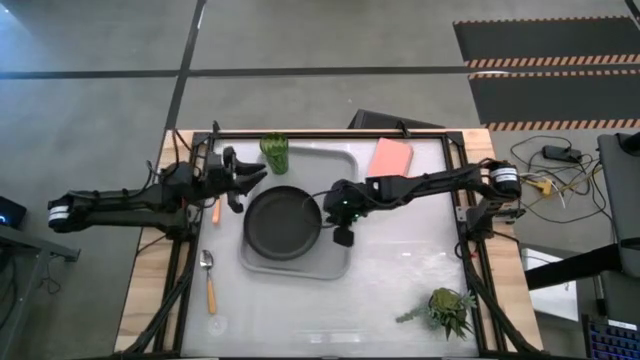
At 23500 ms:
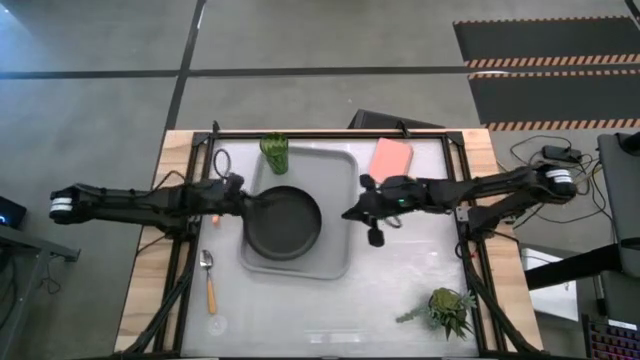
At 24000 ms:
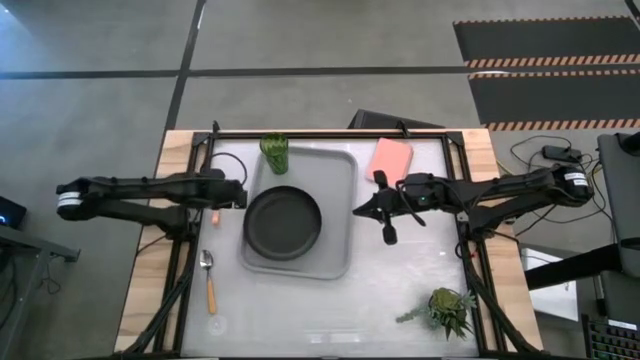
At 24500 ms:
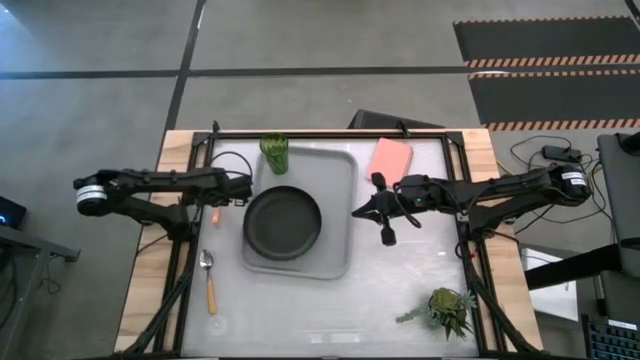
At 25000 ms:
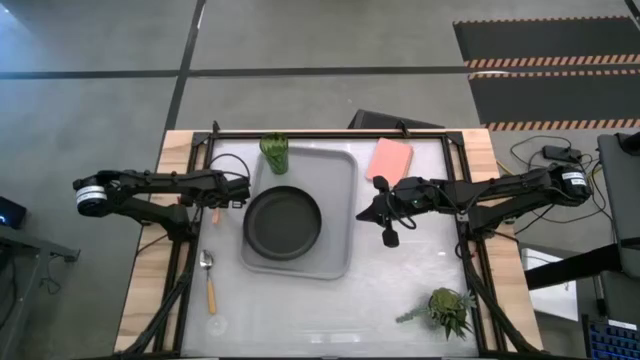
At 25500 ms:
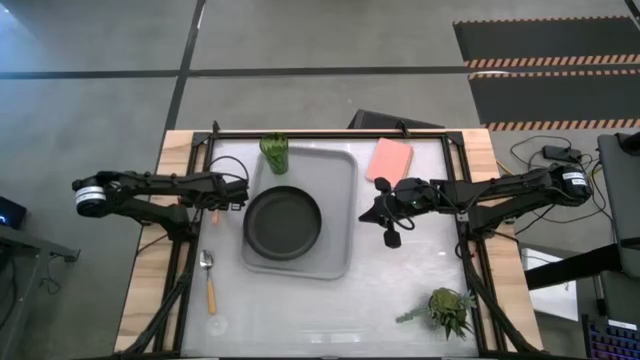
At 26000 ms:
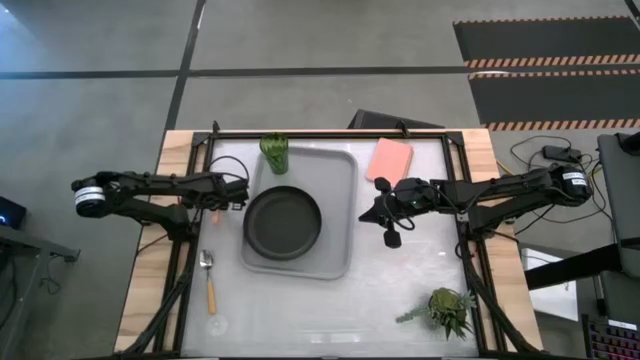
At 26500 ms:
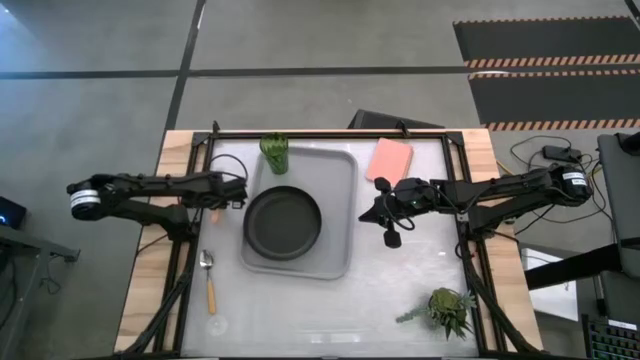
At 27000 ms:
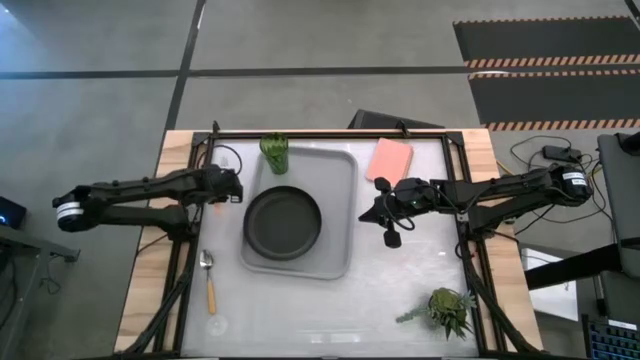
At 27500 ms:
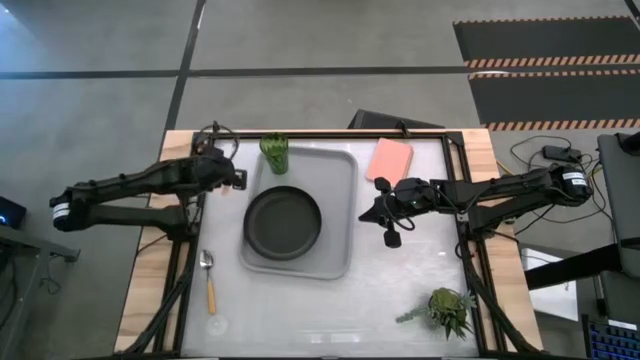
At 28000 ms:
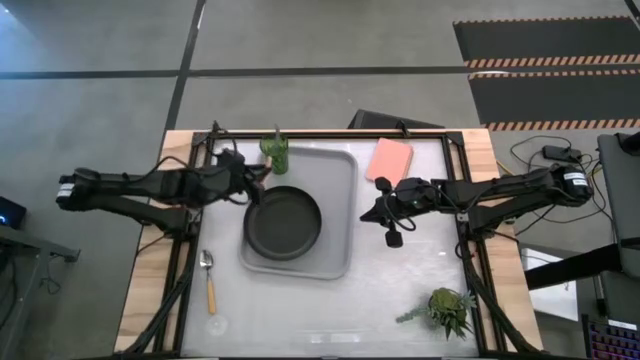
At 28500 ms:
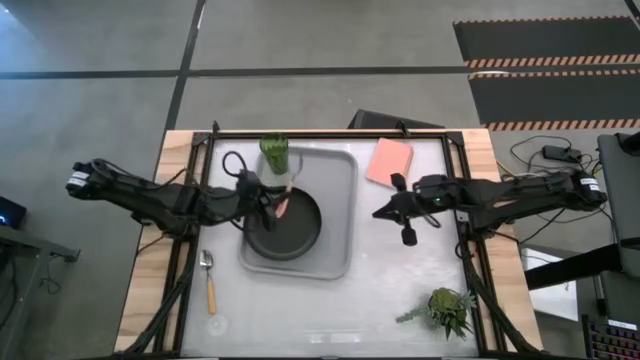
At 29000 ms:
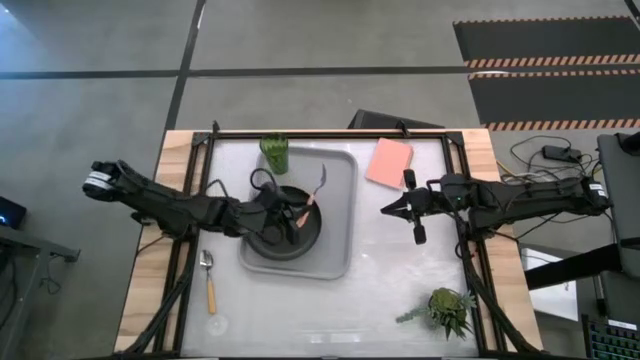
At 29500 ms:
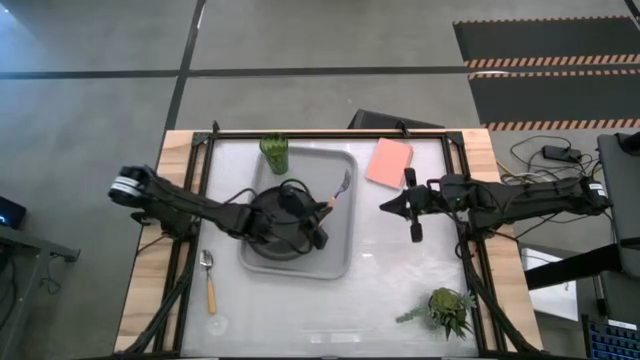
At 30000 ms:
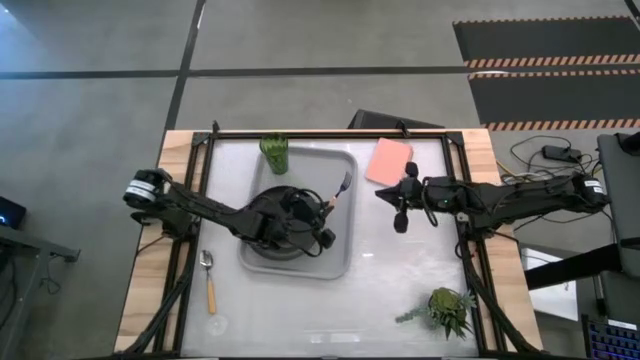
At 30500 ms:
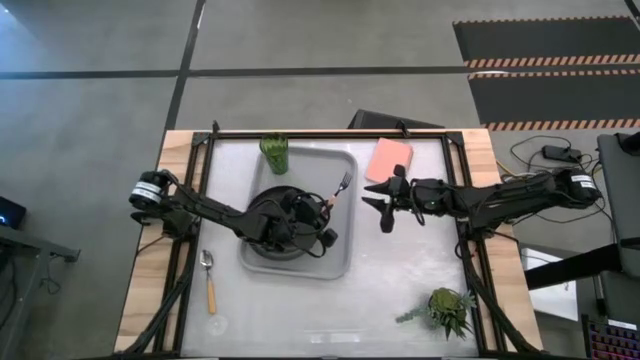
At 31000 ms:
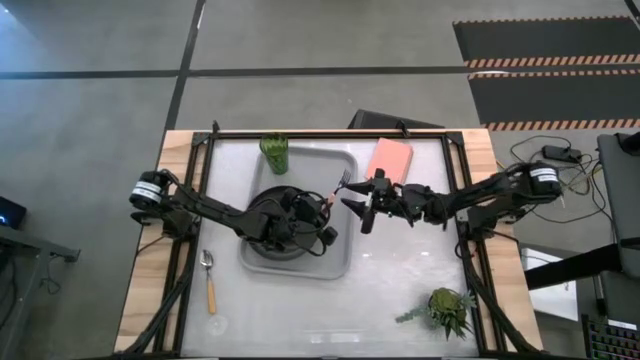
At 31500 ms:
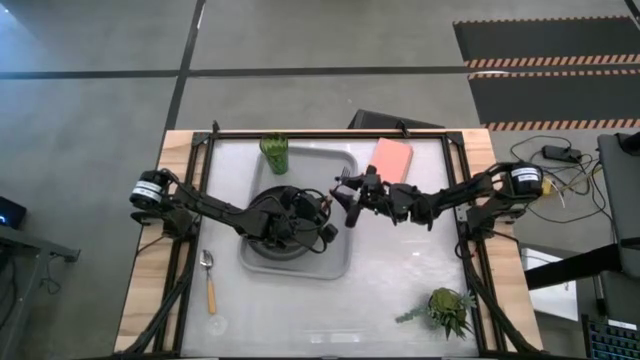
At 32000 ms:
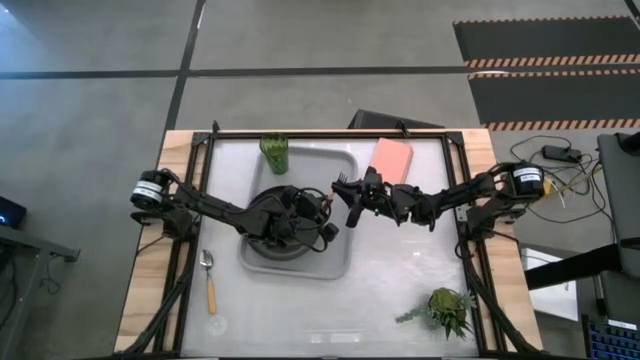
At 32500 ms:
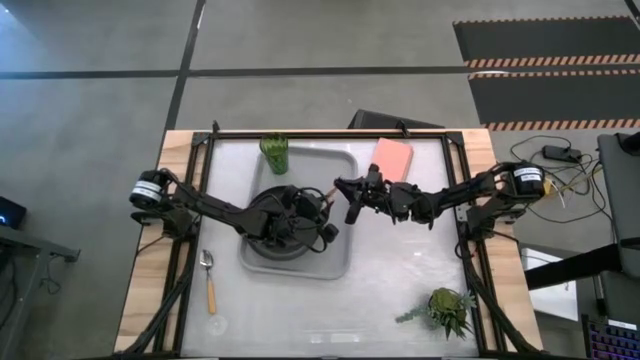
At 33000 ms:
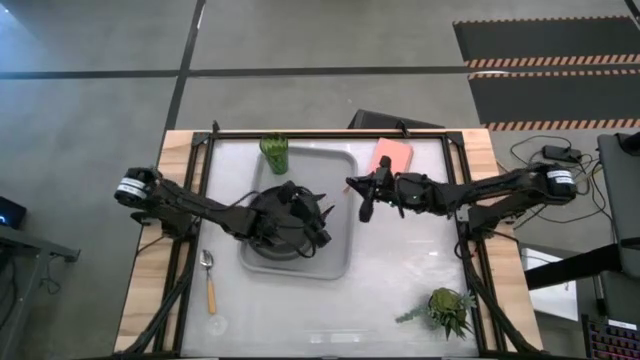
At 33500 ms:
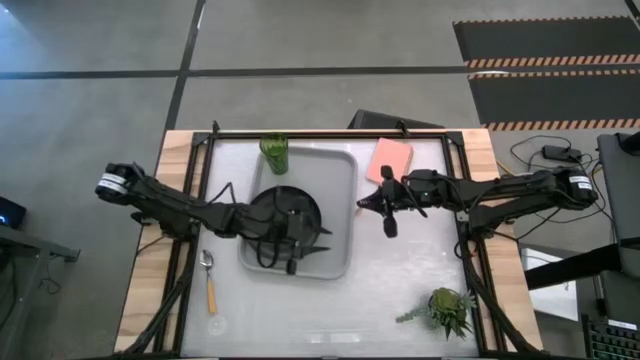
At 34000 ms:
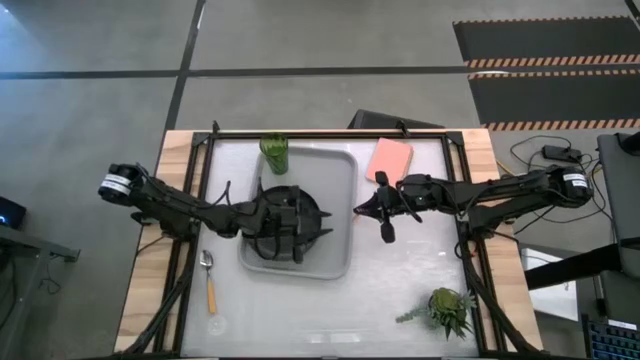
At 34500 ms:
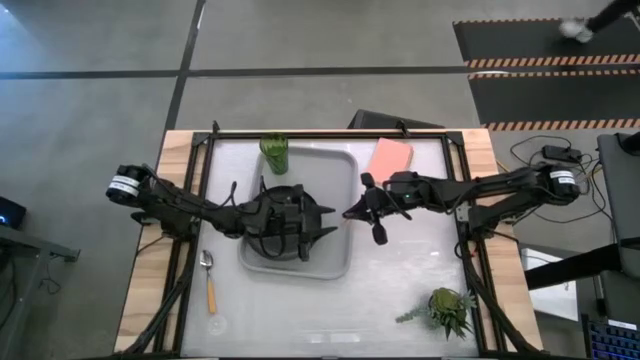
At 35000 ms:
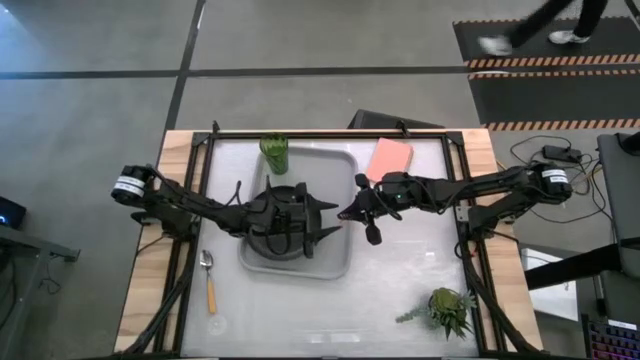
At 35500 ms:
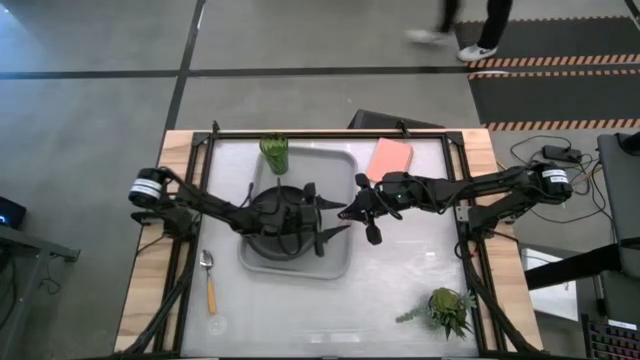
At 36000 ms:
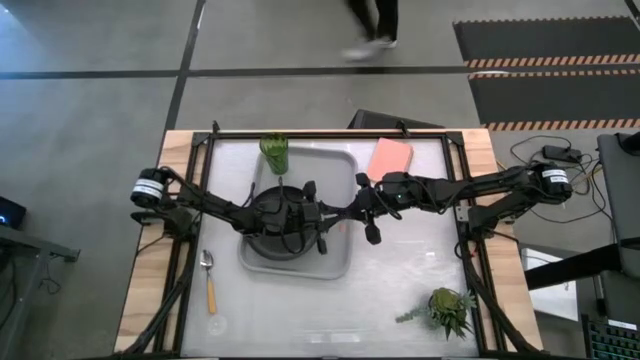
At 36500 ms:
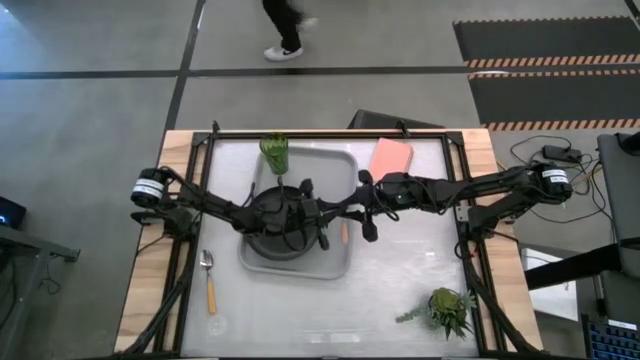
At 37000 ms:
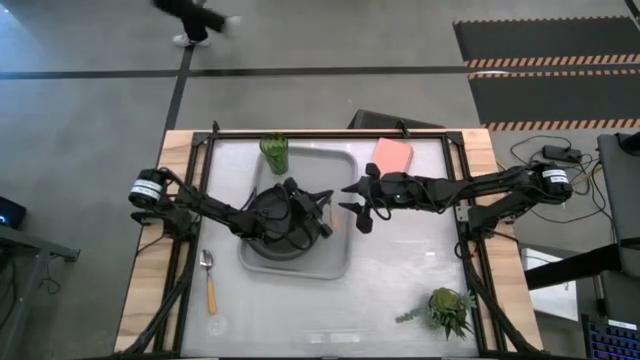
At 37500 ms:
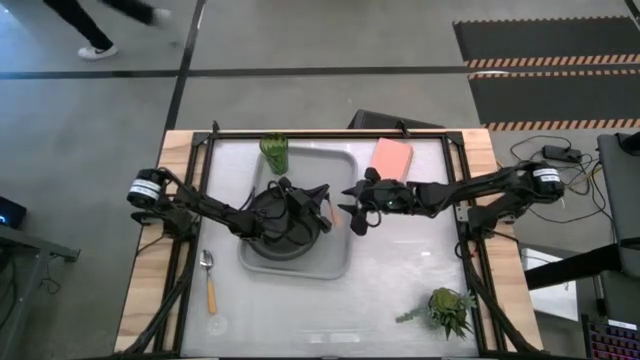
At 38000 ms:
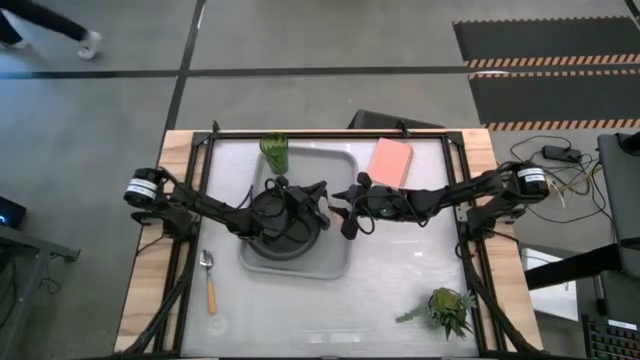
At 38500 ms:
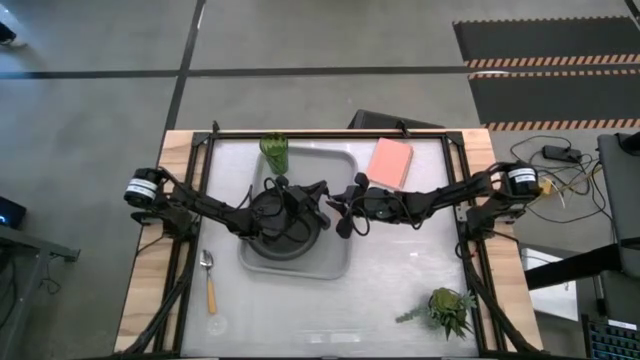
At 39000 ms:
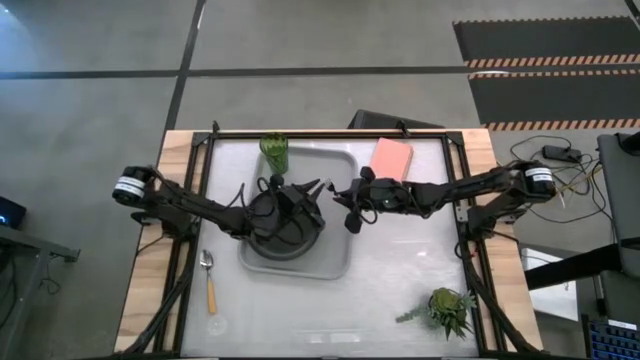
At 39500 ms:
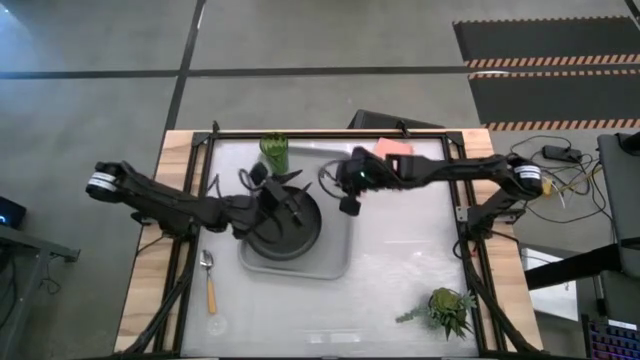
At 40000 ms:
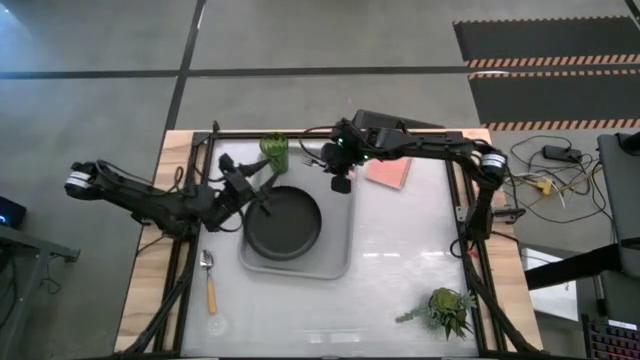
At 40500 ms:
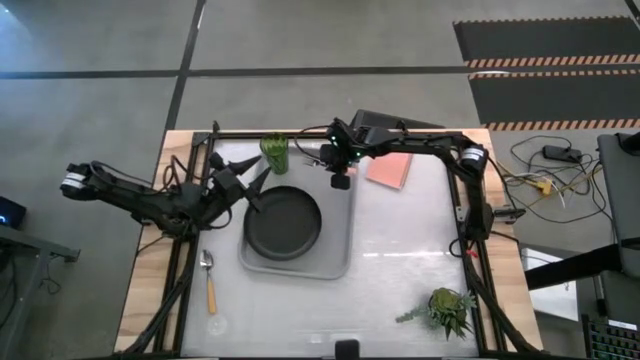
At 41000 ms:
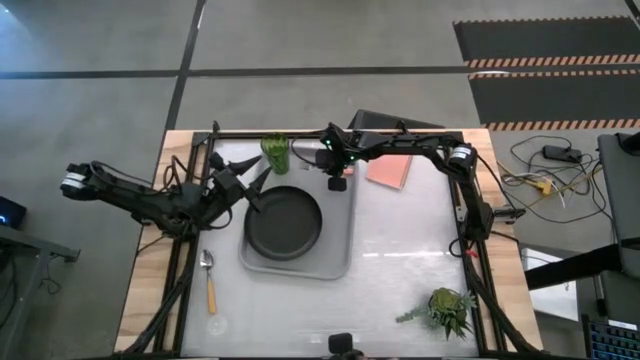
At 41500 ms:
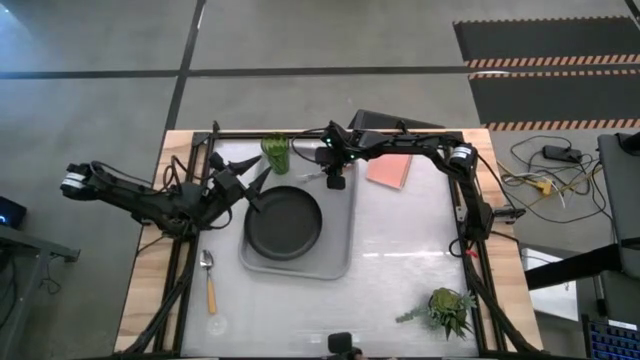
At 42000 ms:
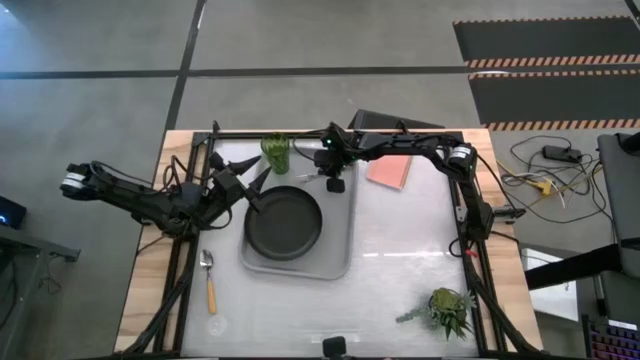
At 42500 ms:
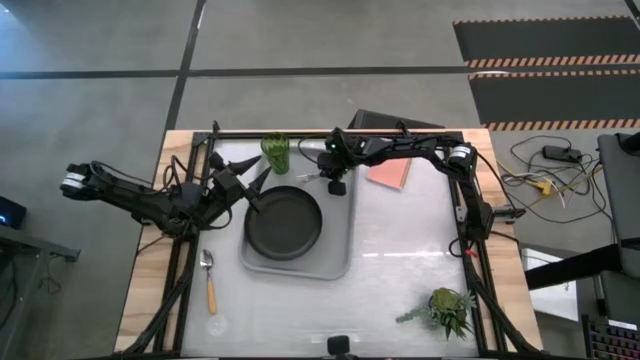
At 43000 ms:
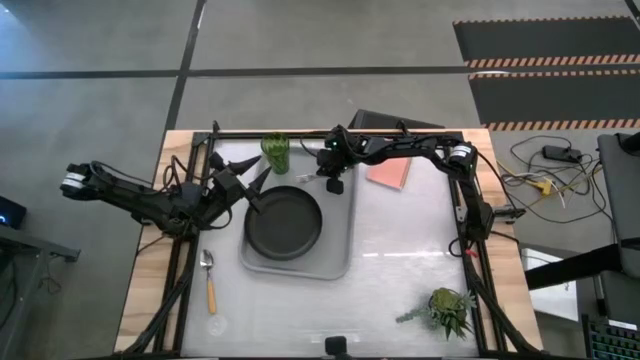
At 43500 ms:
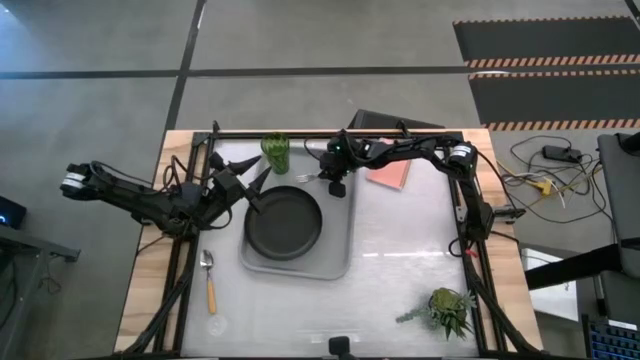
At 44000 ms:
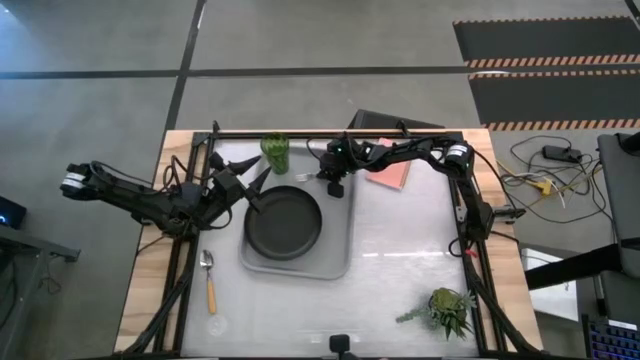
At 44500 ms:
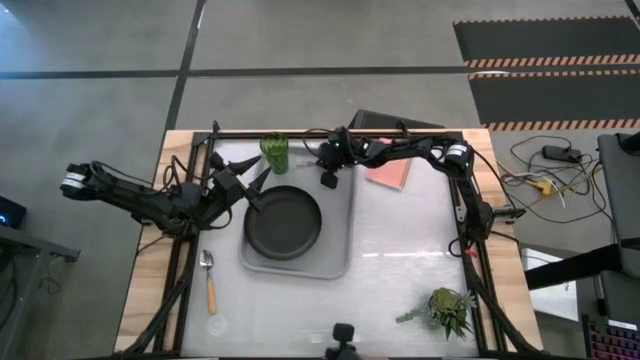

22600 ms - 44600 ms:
Task: Pick and place plate/cup/fork/spoon on tray
Put the yellow fork on the gray serving tray to the right of the black plate
